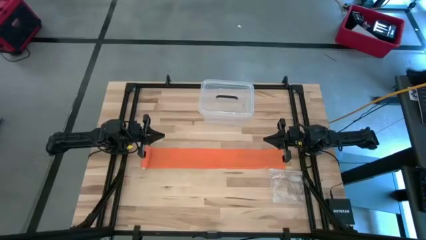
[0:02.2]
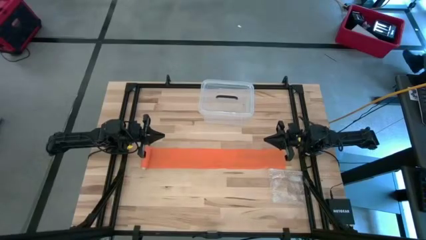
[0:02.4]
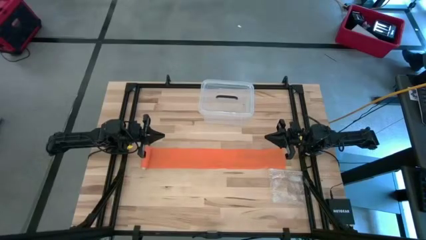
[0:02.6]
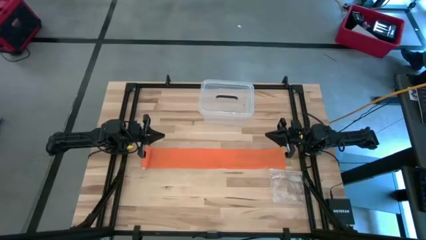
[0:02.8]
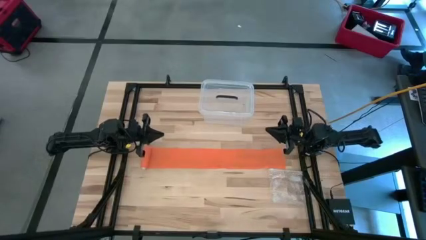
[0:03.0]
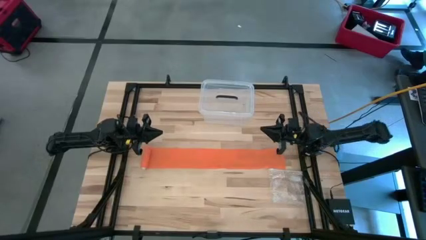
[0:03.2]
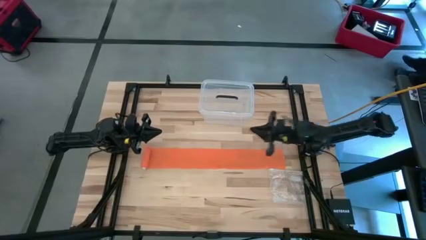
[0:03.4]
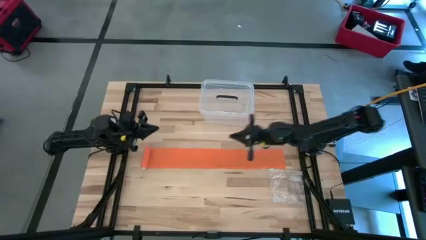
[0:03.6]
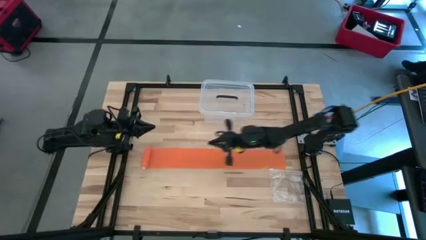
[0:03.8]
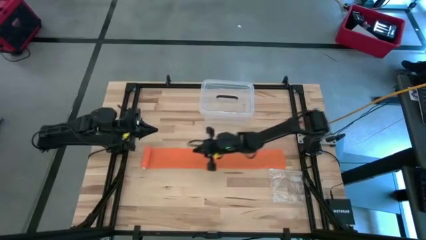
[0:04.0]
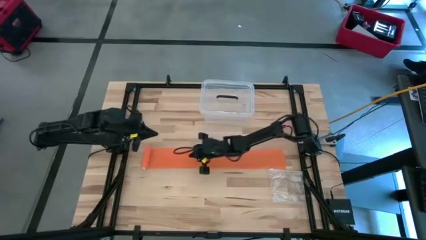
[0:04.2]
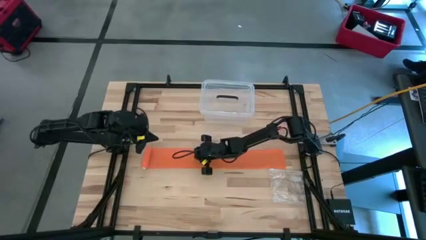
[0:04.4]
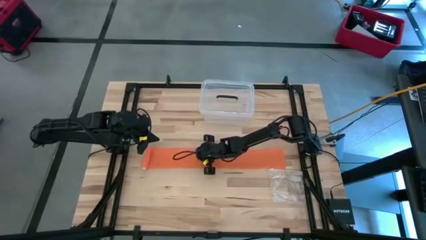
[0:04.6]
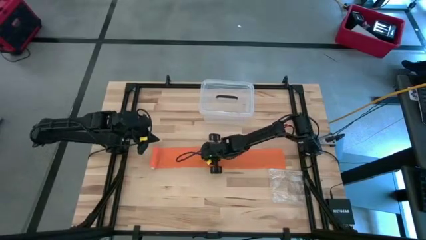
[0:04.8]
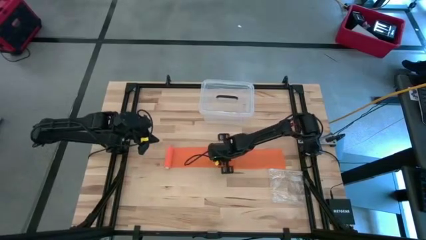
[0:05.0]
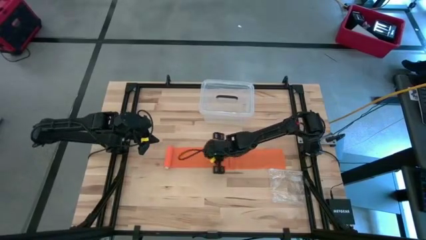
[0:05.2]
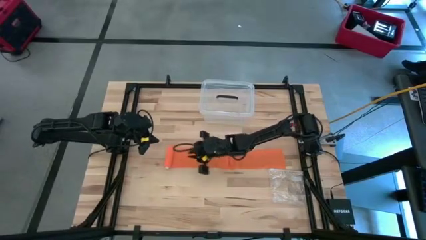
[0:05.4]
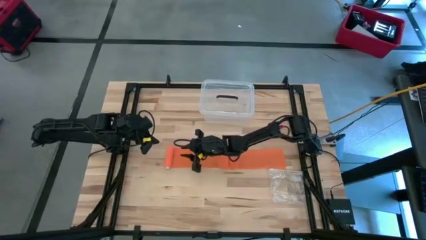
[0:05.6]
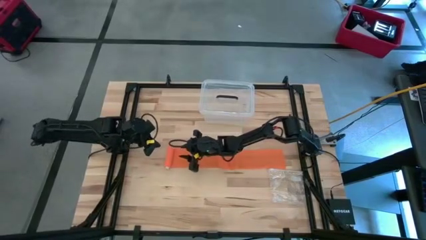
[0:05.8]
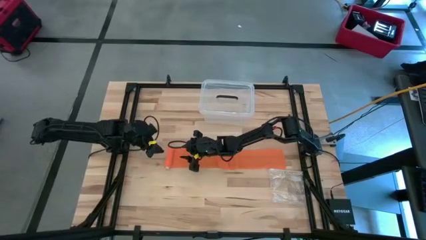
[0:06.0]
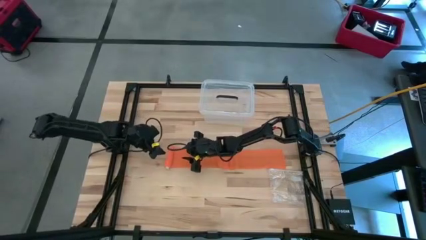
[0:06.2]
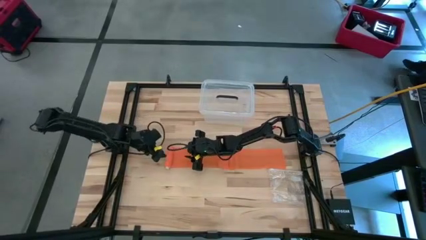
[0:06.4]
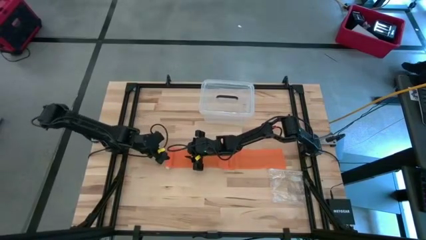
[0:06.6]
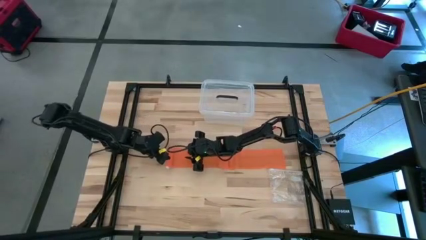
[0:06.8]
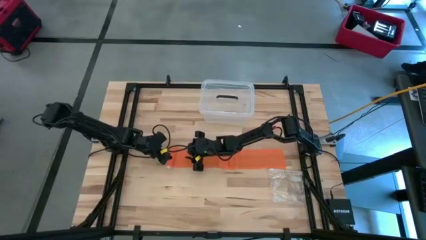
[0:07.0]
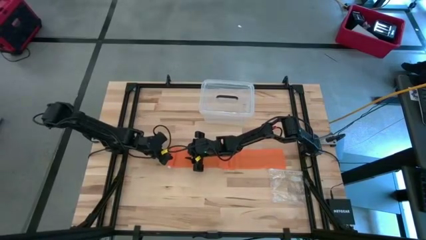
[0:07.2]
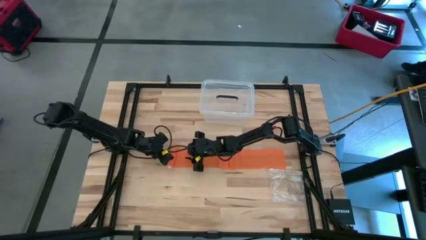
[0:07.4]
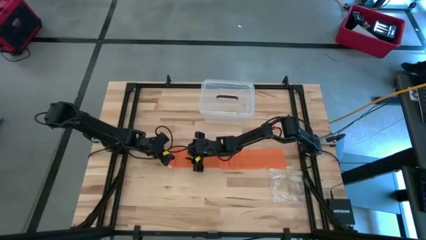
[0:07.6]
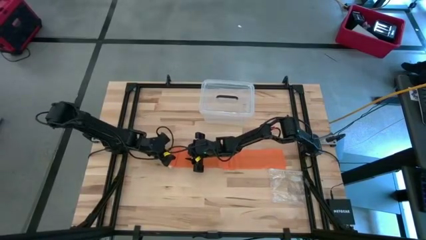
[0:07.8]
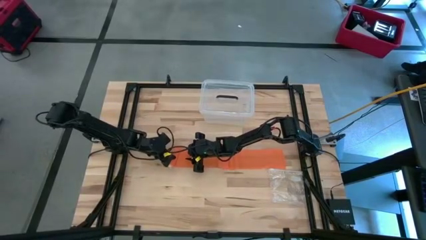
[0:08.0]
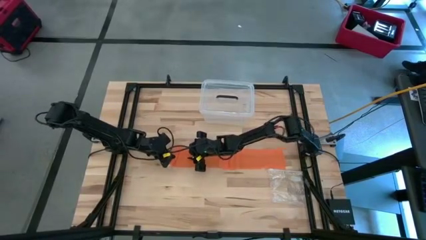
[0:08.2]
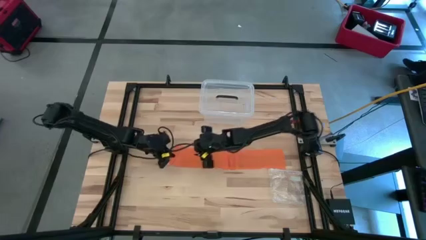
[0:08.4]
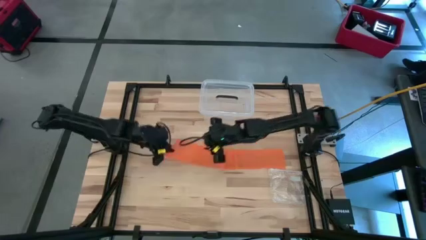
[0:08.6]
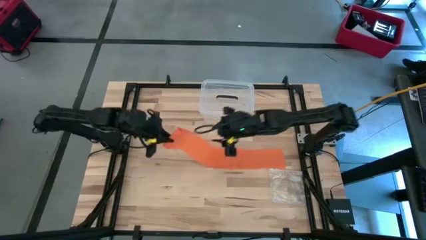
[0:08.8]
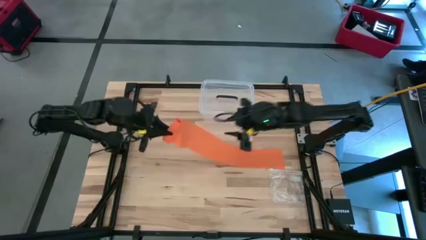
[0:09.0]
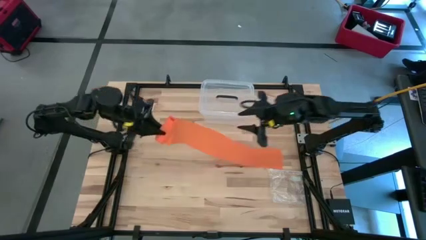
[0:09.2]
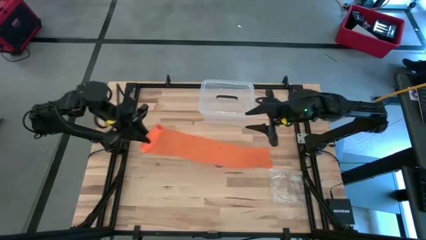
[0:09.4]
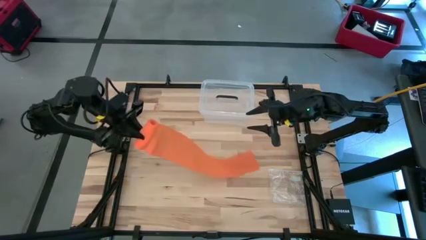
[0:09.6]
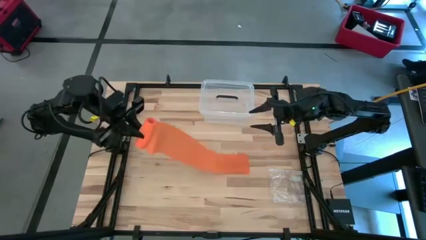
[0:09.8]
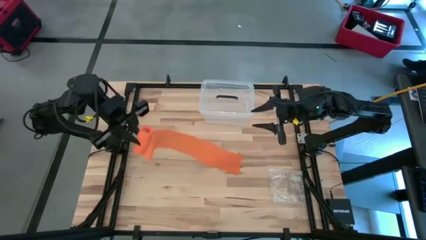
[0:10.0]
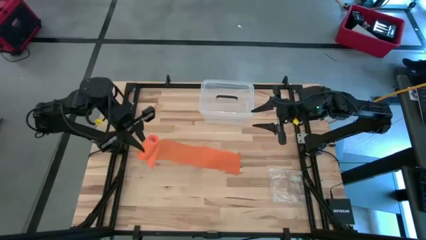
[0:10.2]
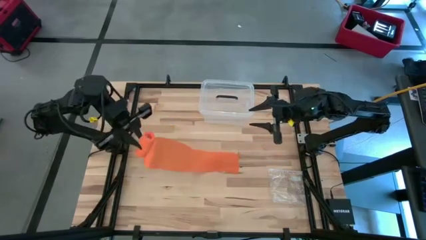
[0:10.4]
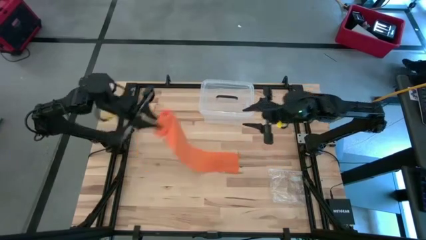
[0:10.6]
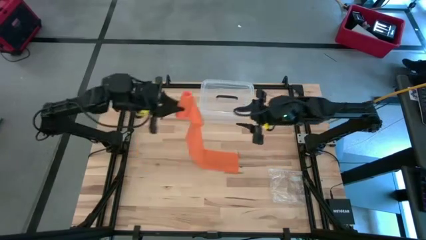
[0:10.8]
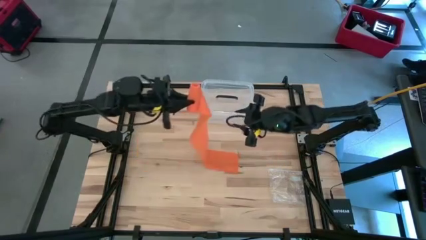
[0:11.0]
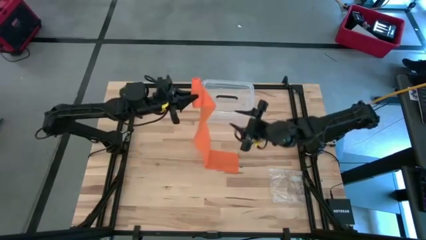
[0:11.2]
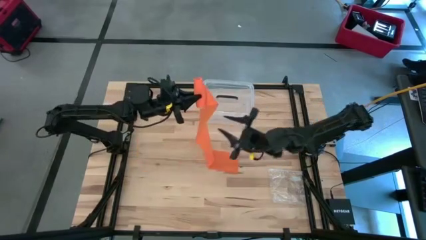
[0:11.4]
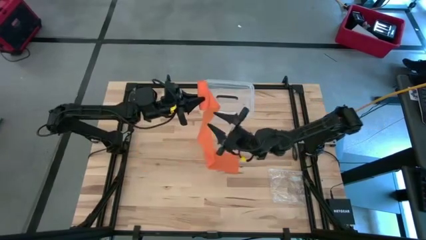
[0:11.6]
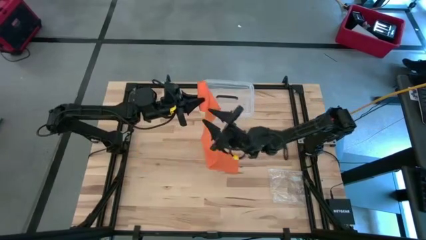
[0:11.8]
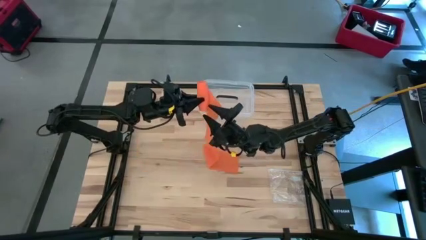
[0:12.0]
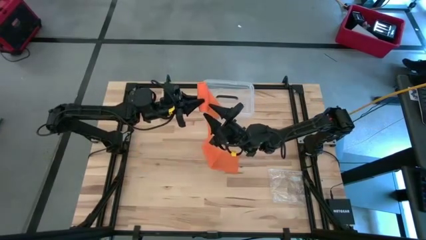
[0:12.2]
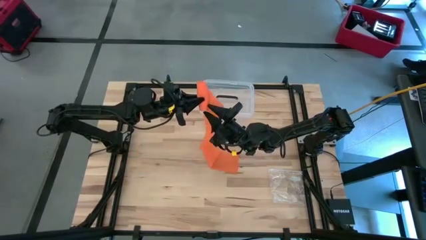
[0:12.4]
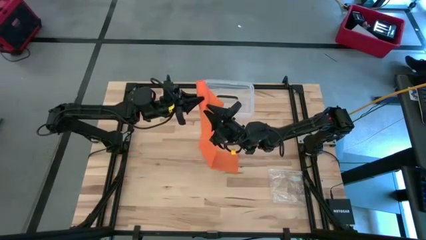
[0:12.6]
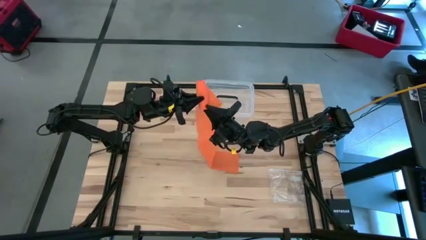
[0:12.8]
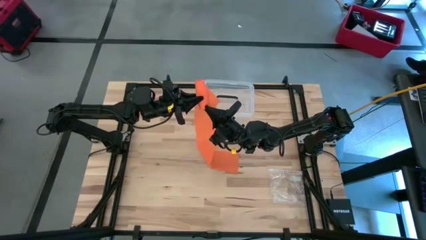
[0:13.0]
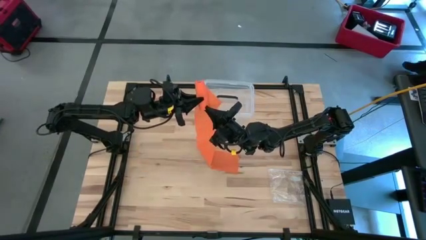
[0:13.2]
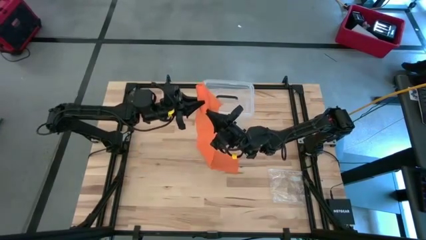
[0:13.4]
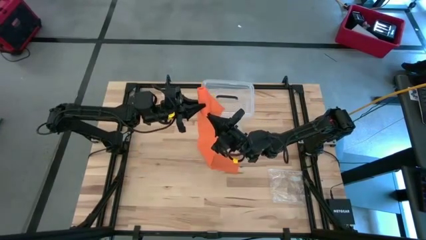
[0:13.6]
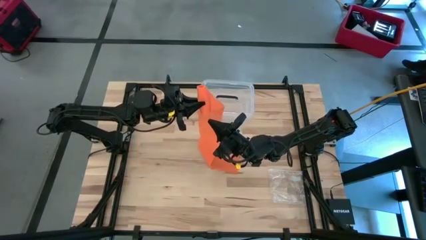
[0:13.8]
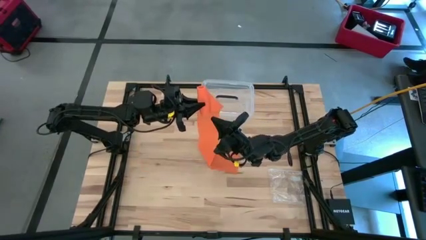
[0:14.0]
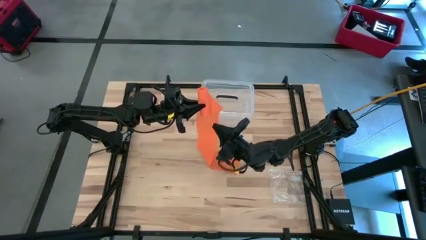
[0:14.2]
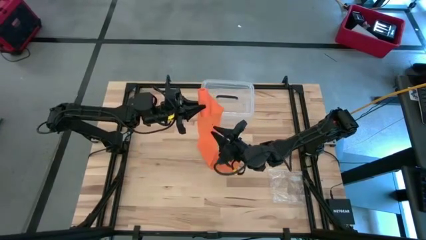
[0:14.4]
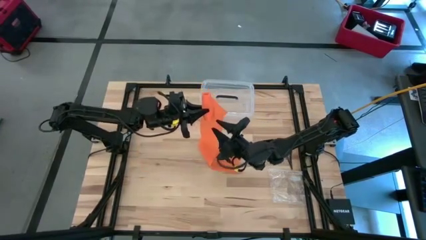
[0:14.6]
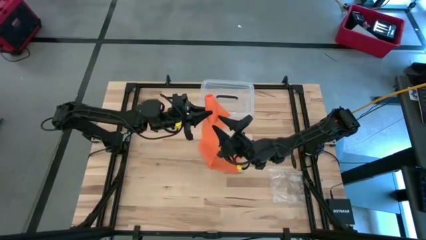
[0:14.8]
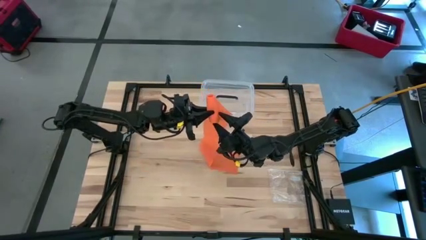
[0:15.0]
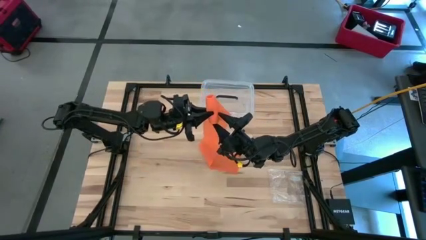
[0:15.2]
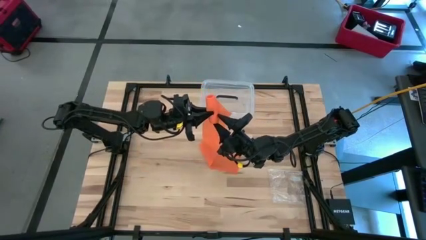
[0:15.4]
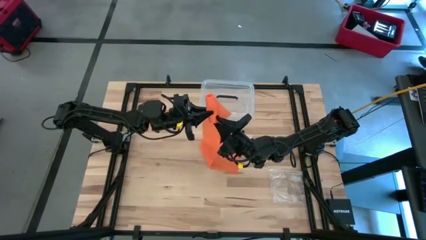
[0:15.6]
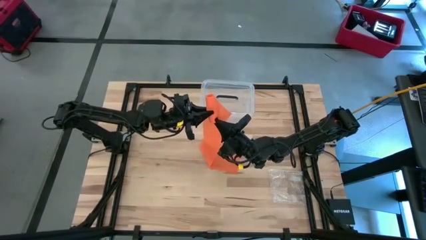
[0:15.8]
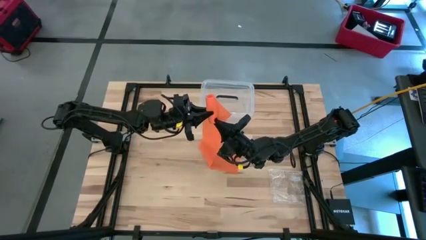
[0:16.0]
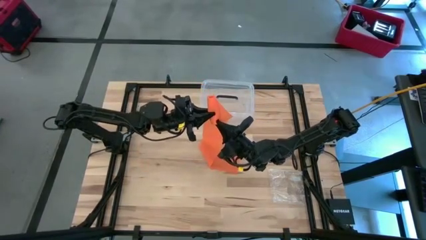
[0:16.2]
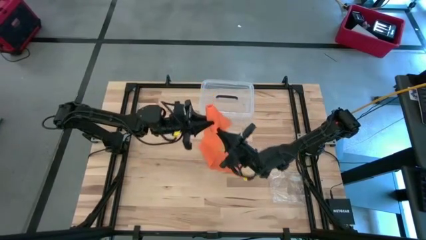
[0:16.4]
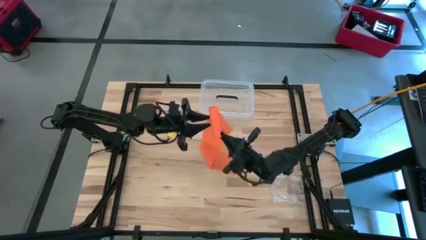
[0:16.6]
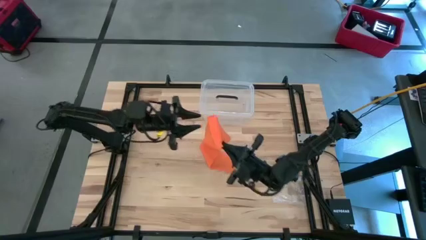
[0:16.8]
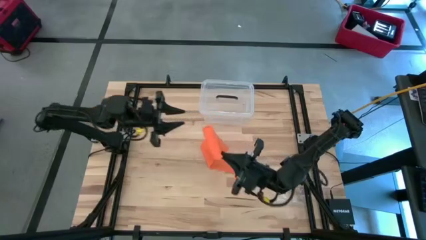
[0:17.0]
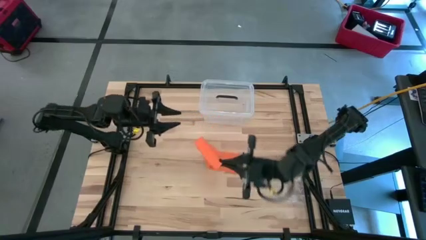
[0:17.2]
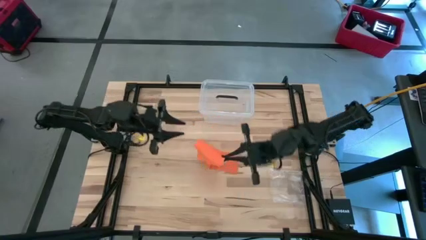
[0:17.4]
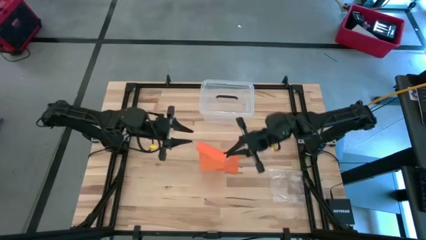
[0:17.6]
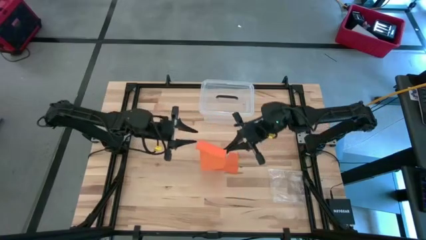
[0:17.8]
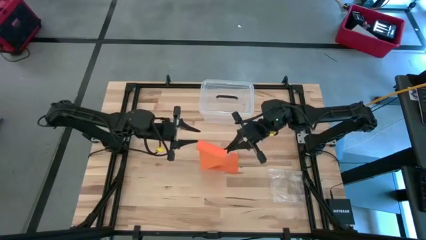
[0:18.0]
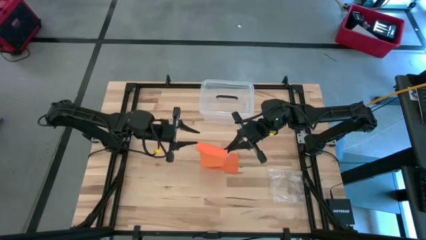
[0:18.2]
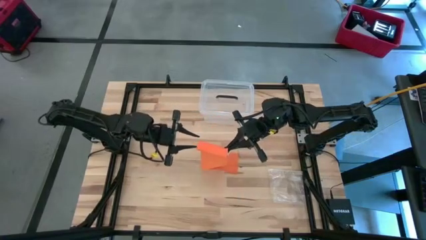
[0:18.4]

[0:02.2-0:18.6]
Task: Roll bandage
Roll the orange bandage
